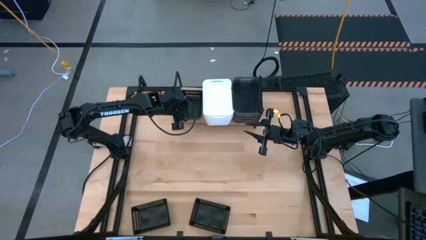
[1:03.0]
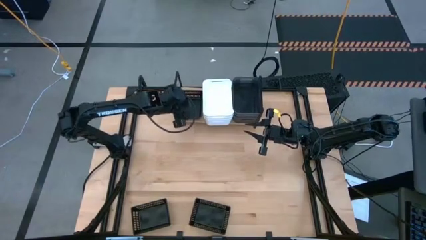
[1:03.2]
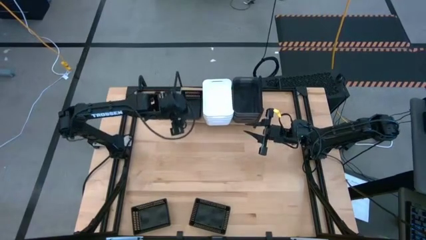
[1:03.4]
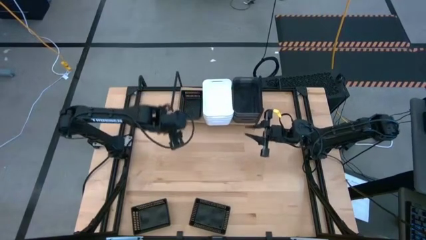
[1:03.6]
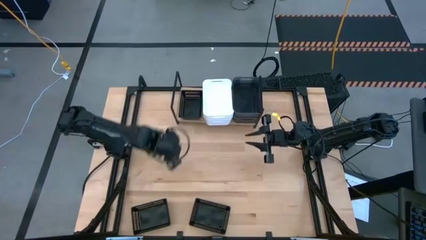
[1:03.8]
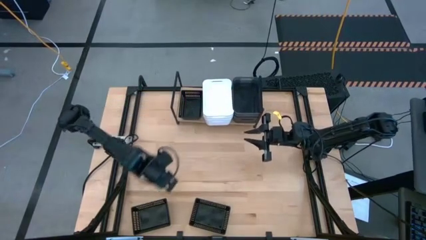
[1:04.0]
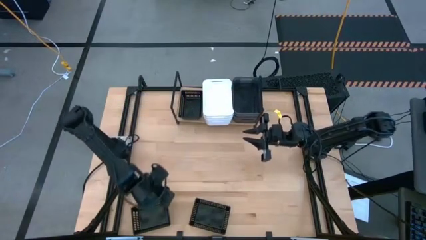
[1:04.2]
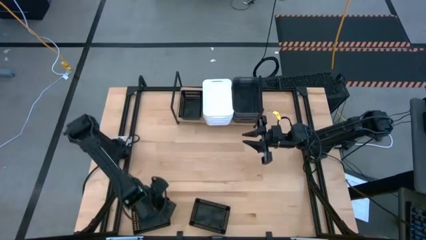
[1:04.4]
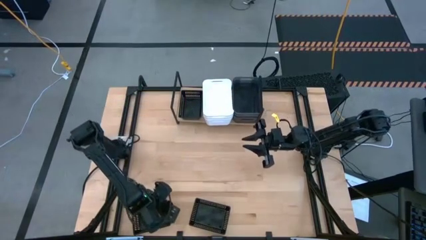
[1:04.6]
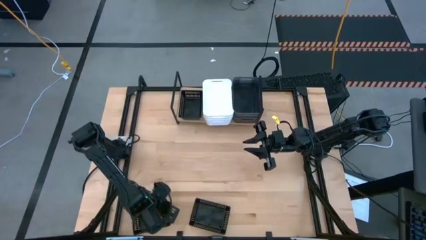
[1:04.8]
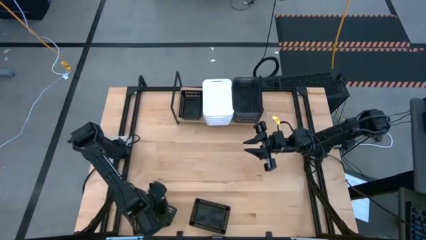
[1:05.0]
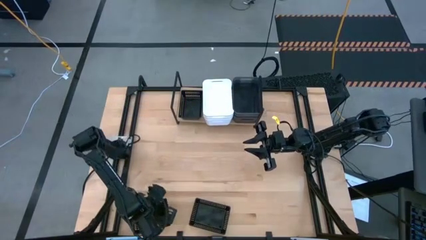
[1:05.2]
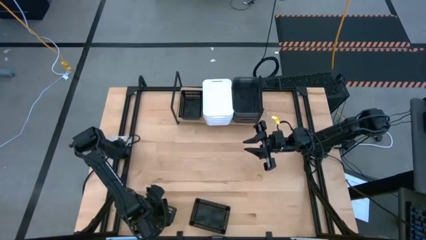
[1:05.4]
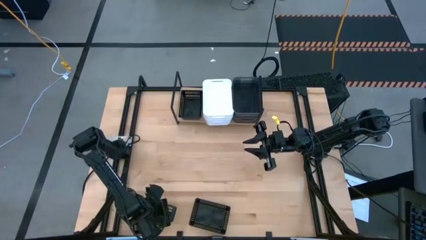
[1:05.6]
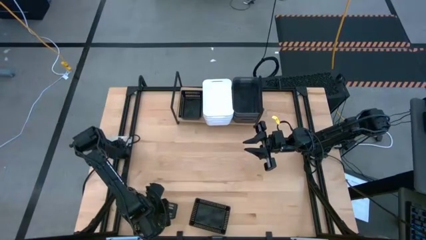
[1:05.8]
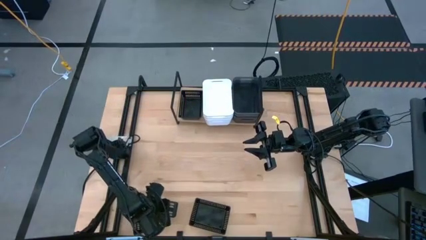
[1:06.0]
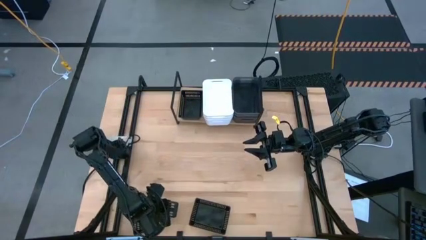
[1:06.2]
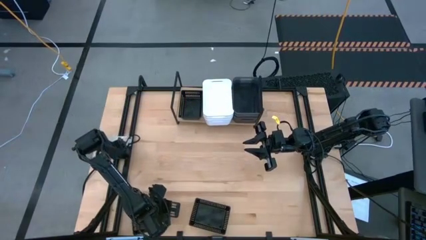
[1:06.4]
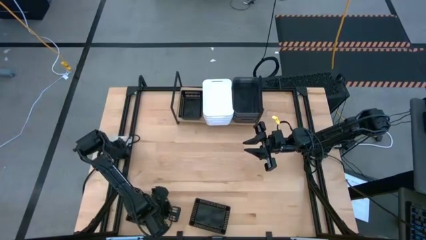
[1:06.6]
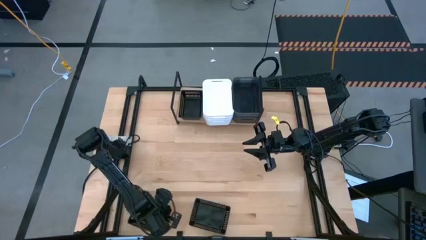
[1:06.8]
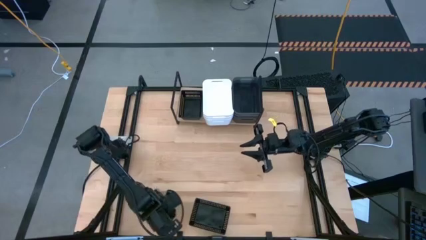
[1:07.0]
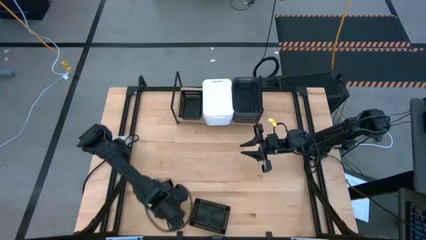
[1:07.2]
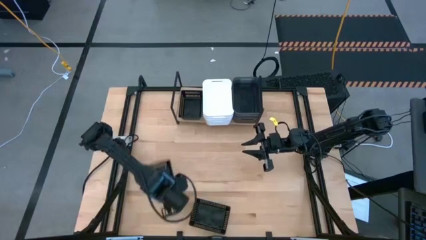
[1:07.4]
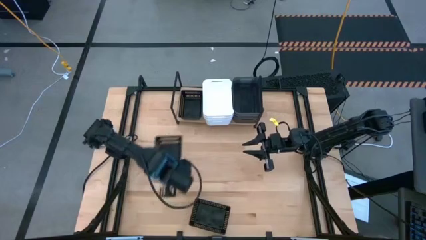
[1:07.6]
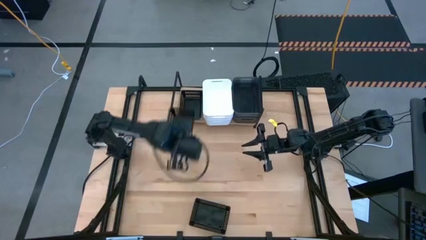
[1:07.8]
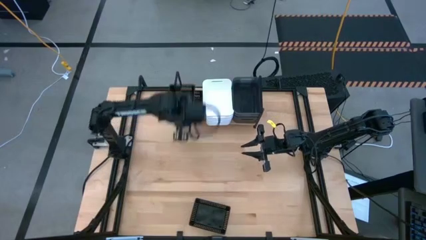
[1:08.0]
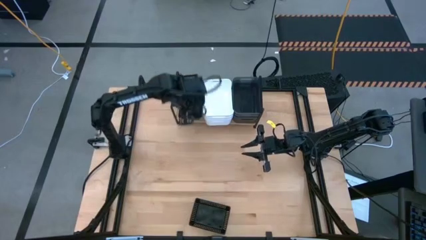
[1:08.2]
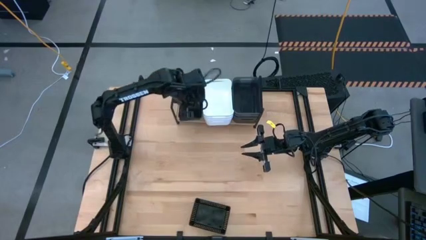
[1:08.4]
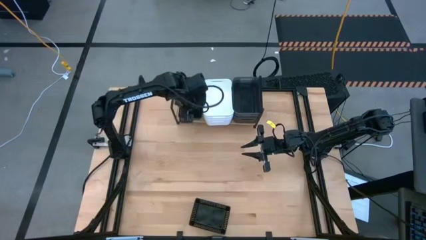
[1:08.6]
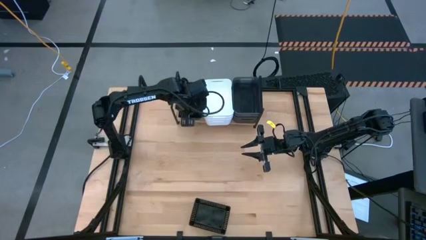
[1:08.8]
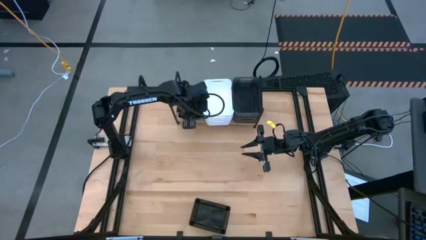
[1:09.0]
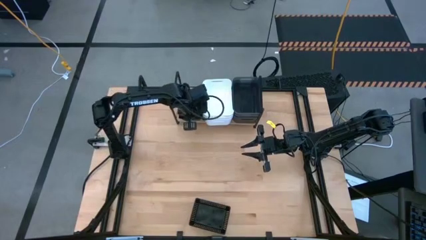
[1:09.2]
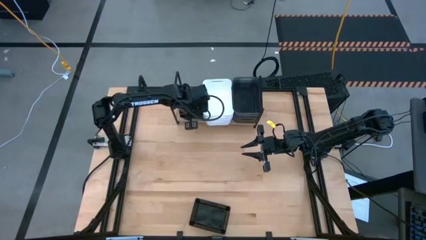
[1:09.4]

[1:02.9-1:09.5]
Task: Stack baskets on shelf by color
Stack the left black bin into the black bin on the shelf

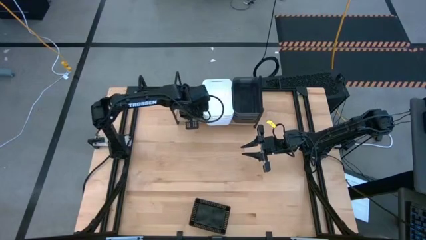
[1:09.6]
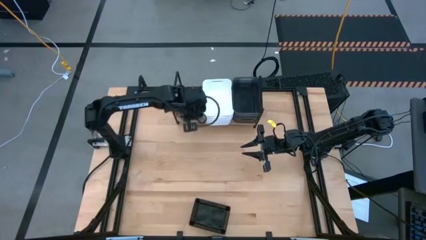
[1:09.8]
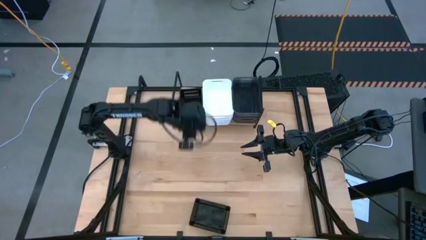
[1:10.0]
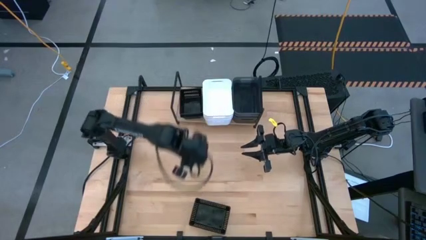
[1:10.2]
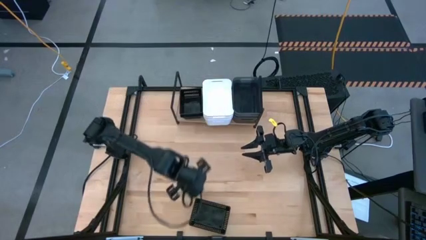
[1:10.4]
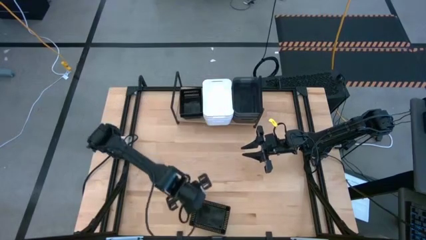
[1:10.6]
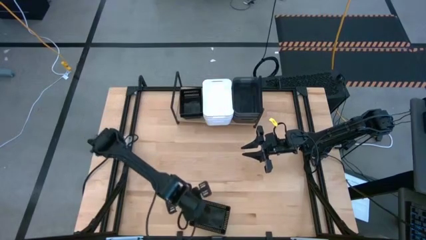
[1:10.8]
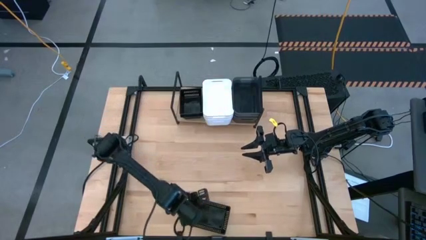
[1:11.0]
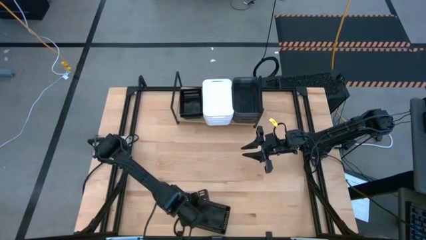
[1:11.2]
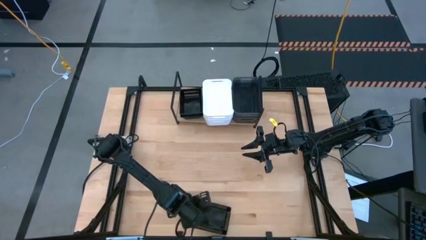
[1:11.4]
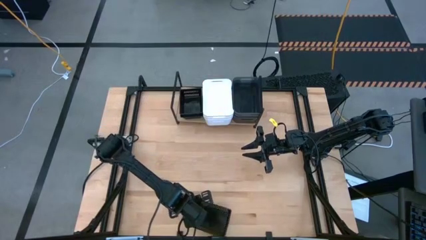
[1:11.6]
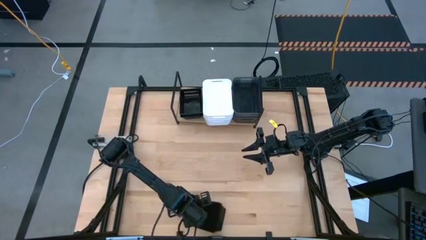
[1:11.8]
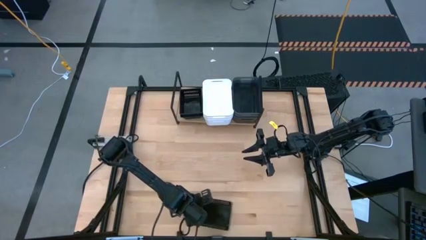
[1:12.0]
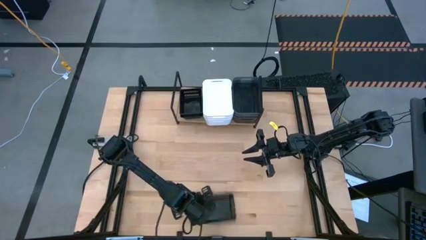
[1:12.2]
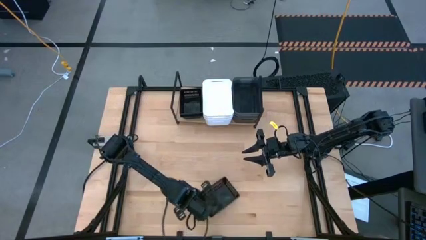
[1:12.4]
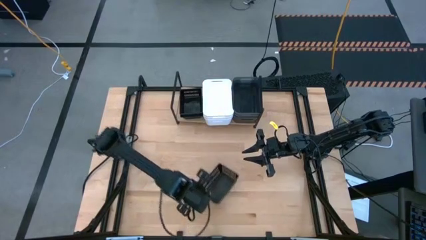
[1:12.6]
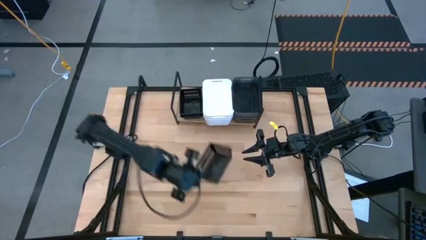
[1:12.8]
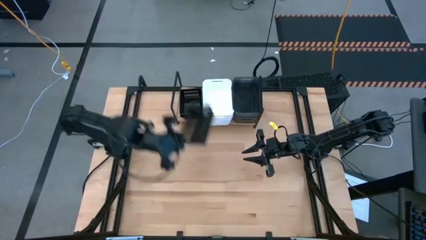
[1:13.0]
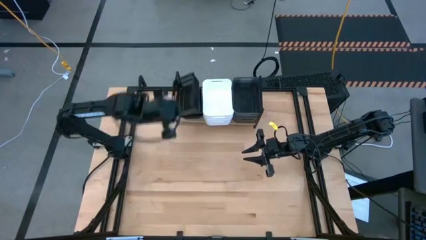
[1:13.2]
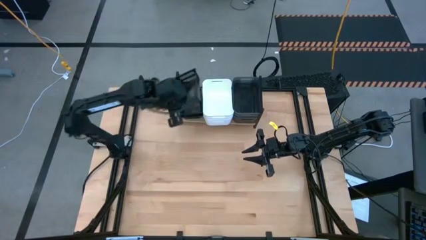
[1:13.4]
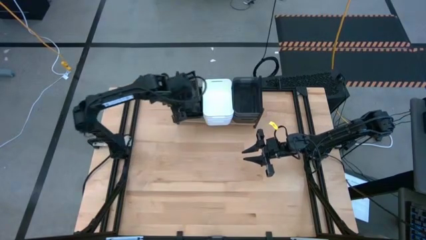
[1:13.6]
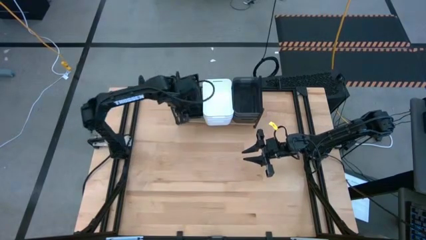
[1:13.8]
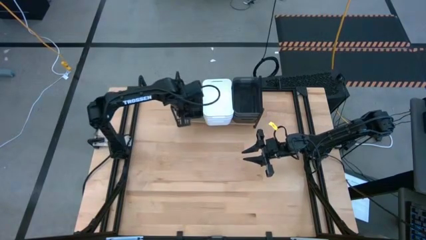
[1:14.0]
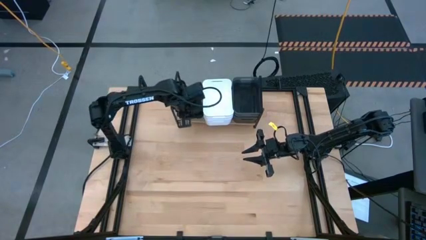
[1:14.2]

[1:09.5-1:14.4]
Stack the black bin into the black bin on the shelf

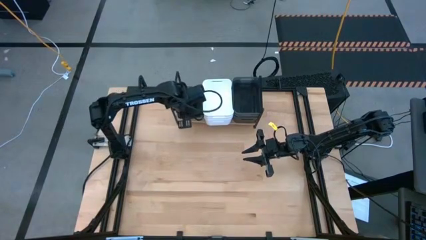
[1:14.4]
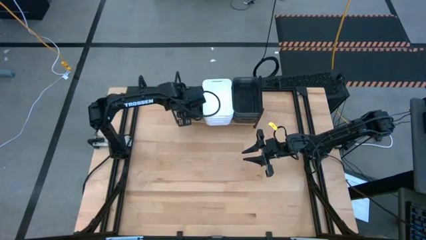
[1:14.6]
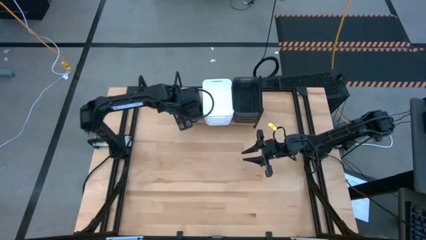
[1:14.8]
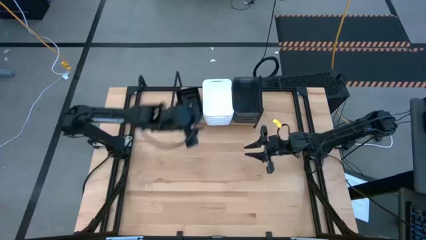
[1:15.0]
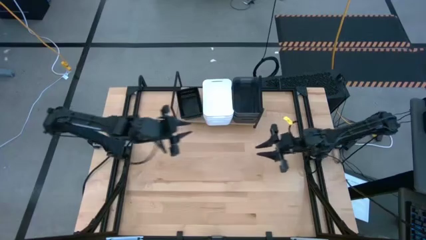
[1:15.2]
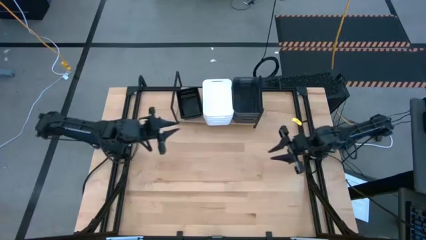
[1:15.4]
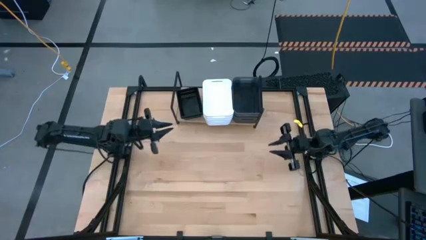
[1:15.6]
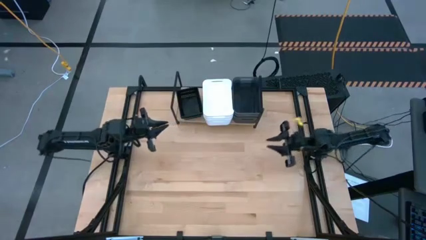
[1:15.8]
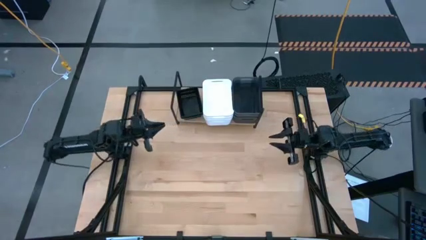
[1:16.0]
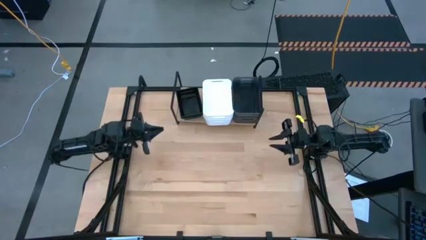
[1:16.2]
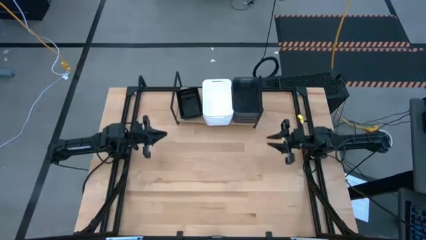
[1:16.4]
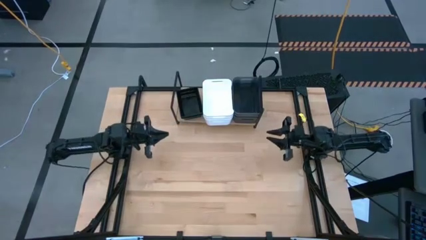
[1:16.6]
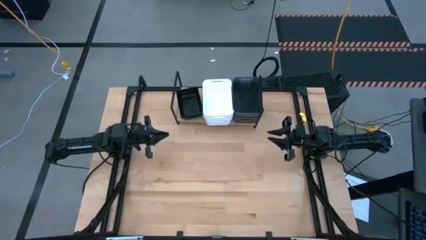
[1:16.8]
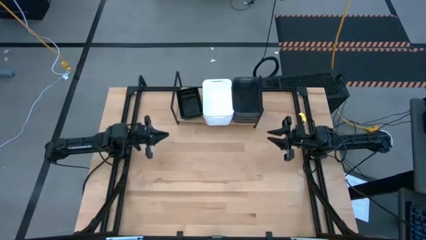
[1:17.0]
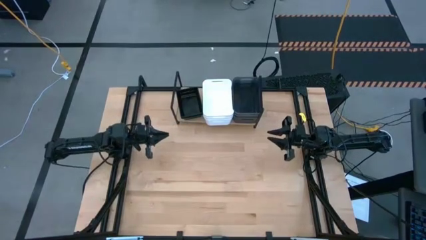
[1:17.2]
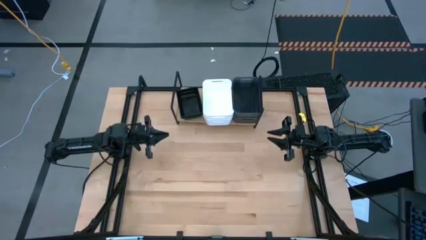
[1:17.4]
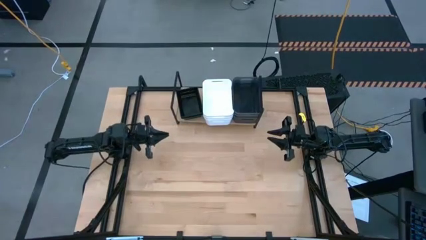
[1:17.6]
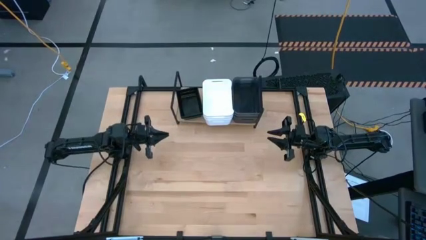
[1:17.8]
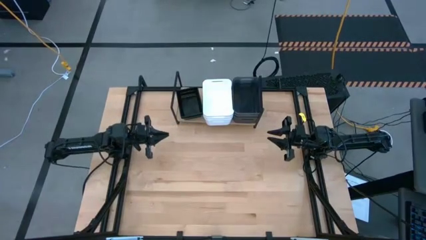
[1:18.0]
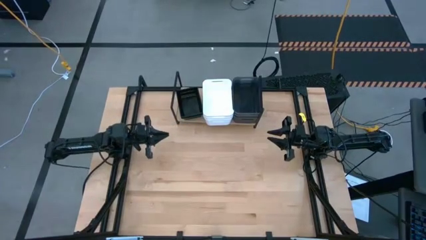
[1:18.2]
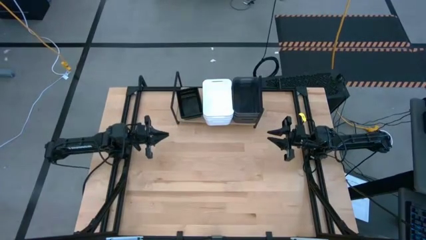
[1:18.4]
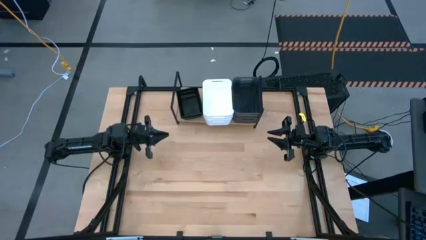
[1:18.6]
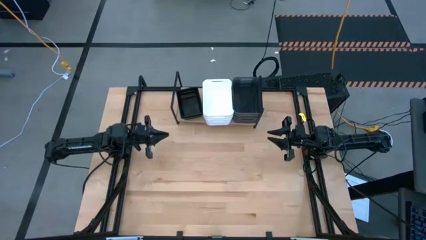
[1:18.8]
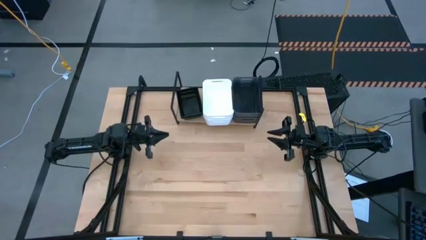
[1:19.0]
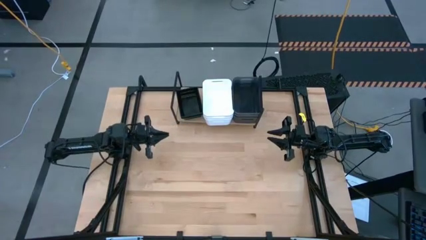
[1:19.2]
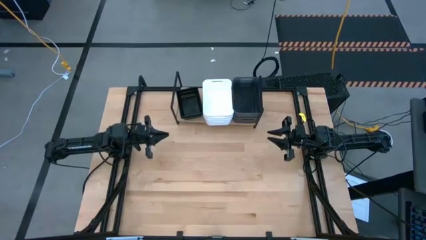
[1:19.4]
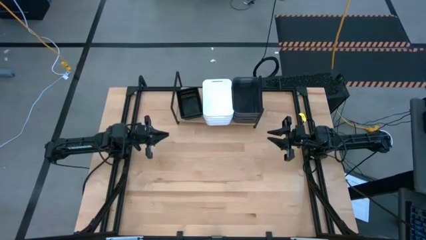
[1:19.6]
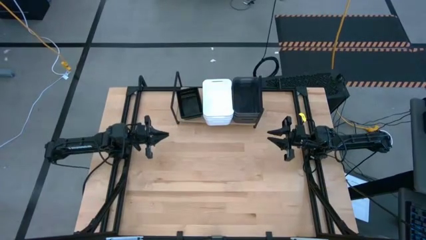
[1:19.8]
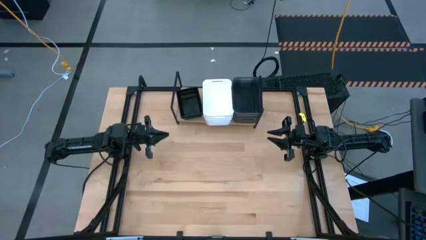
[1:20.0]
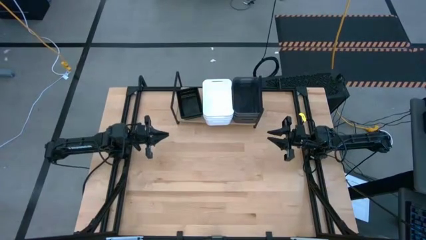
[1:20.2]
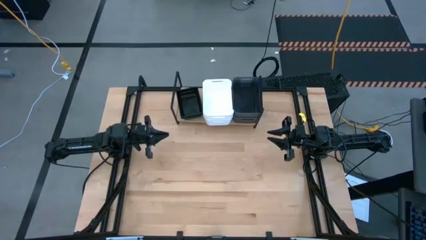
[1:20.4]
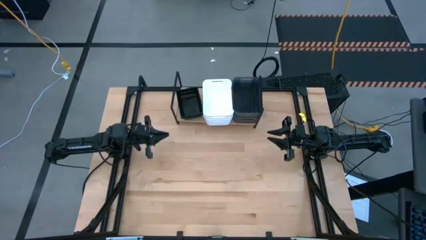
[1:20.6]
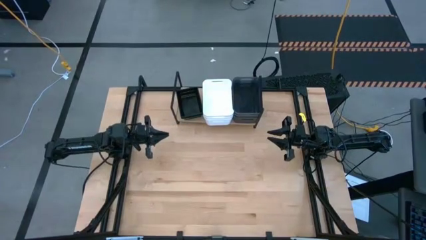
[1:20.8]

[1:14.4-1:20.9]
Return to home position
